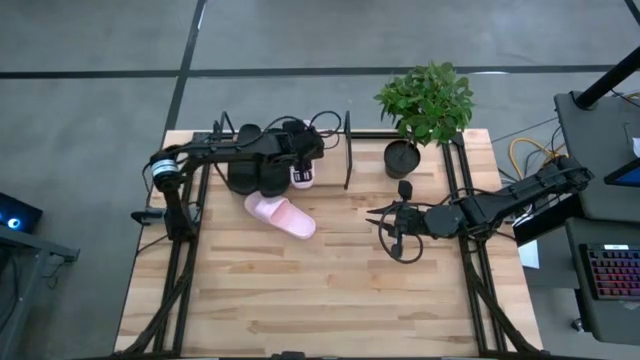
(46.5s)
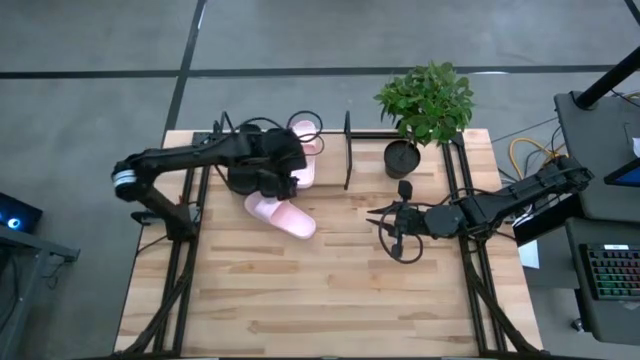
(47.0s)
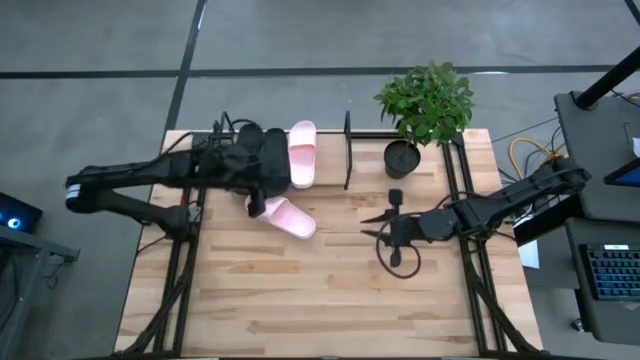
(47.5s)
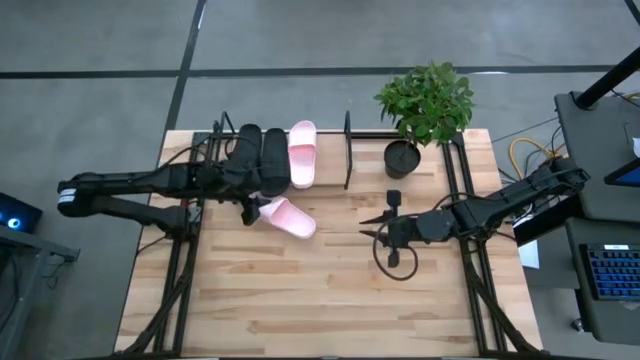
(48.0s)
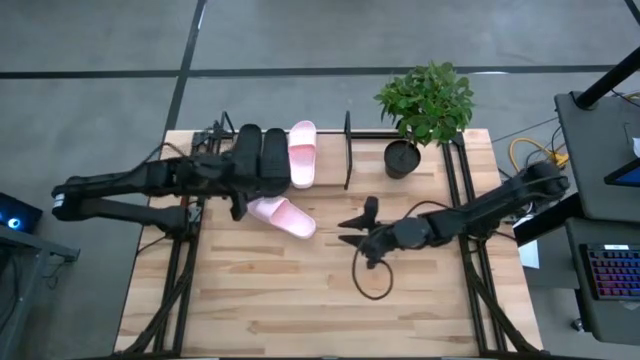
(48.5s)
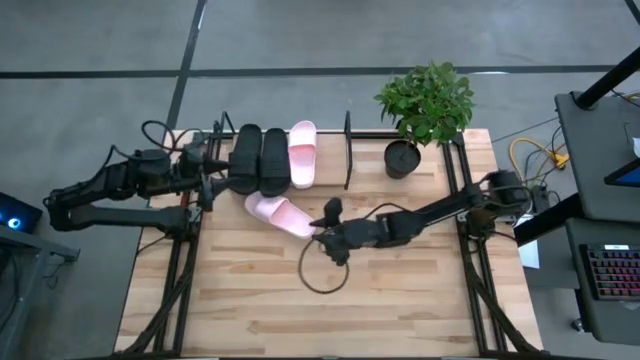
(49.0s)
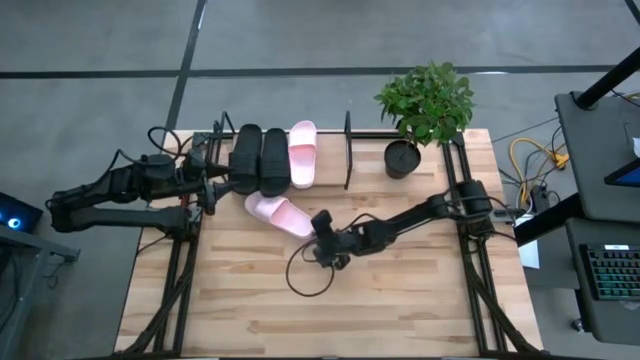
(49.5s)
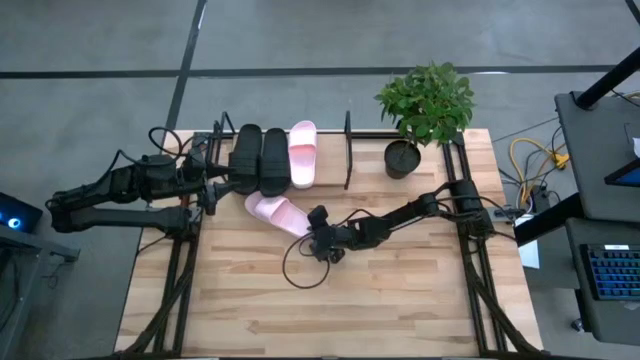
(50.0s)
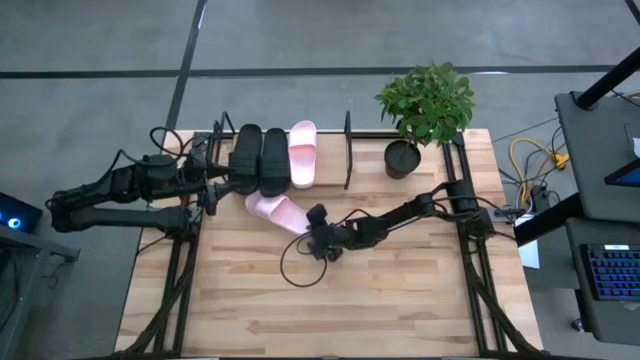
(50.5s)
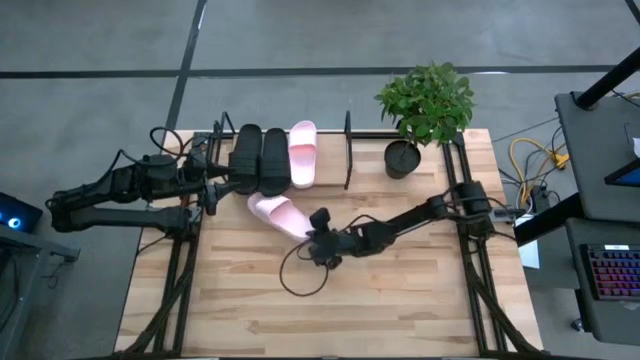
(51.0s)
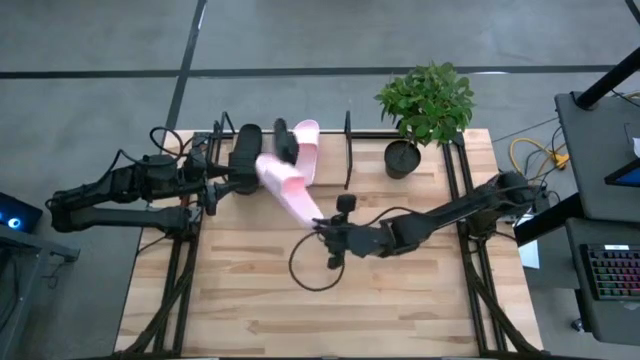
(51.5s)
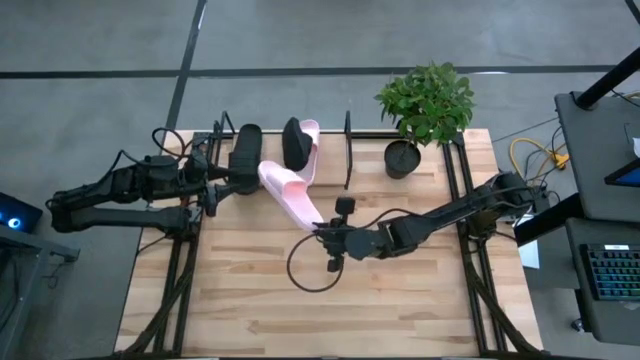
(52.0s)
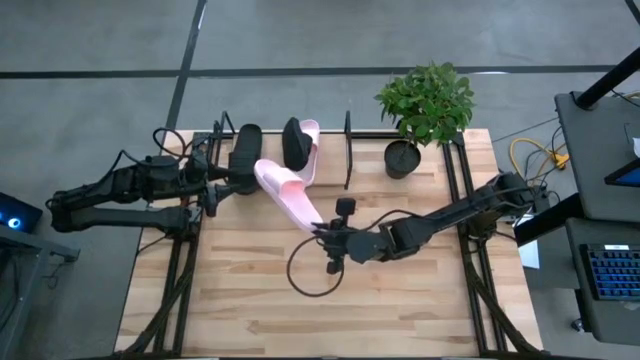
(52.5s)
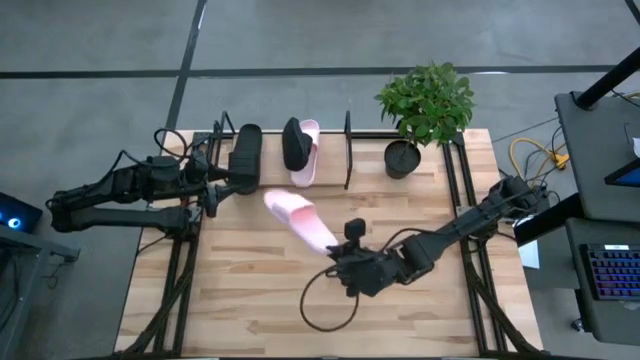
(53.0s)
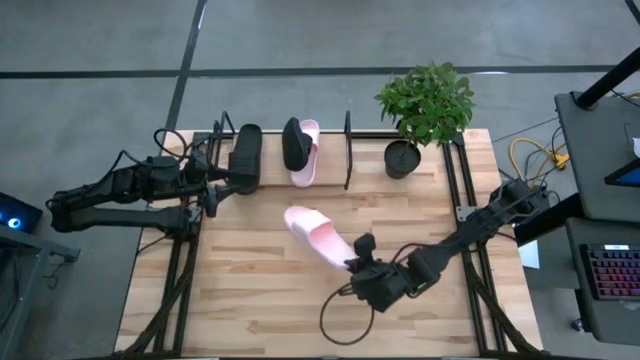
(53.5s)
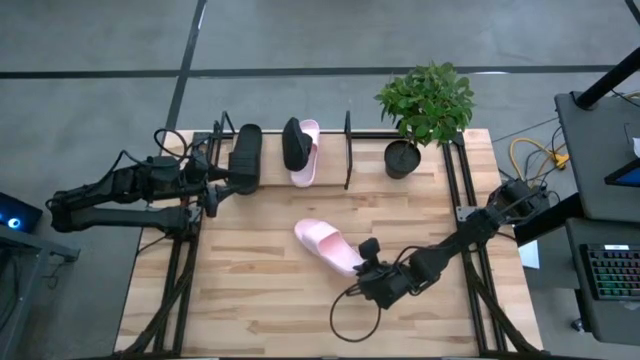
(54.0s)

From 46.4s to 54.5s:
Task: Pick and place slides into the shelf
Put the pink slipper on the shelf

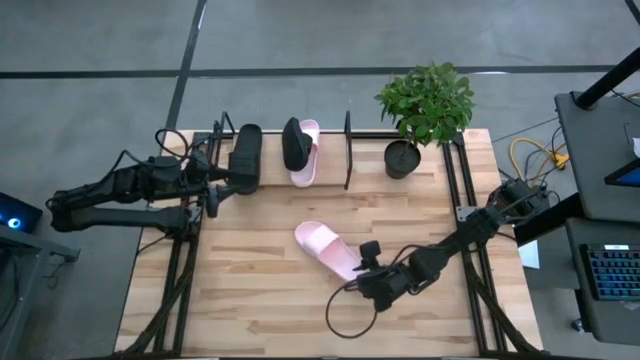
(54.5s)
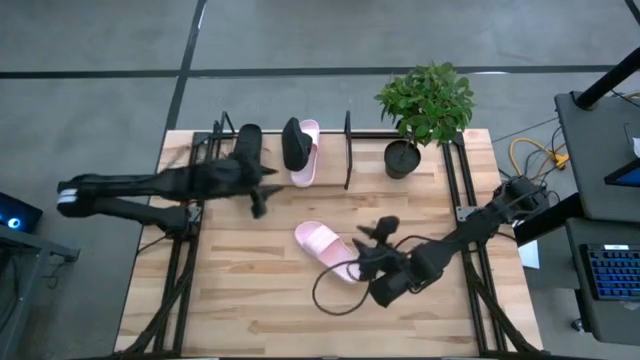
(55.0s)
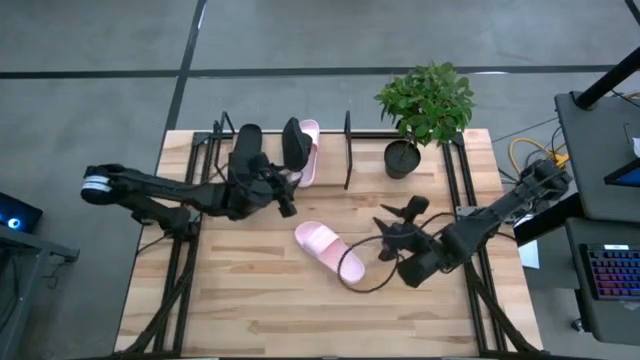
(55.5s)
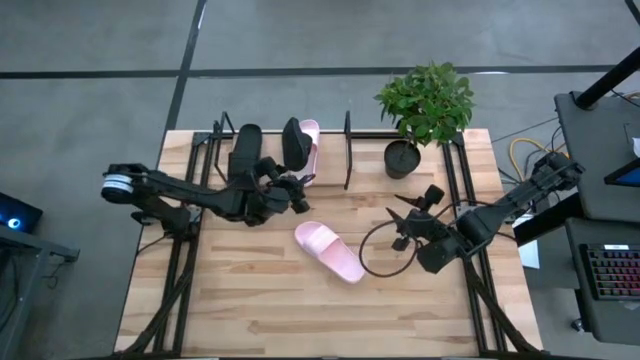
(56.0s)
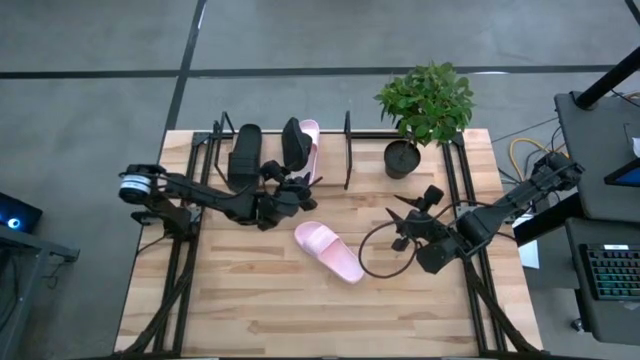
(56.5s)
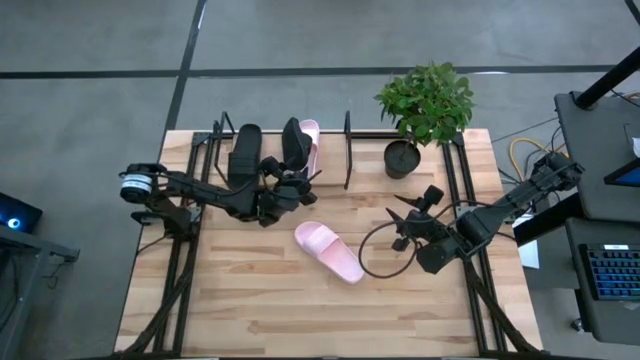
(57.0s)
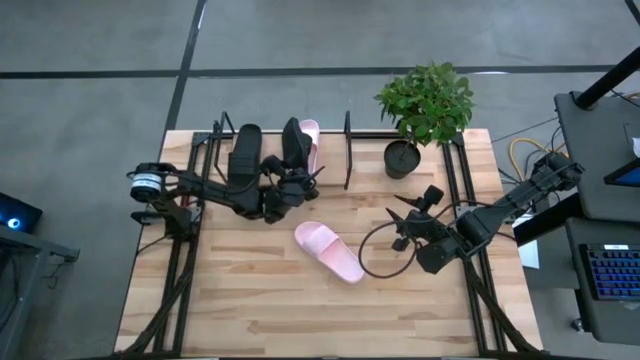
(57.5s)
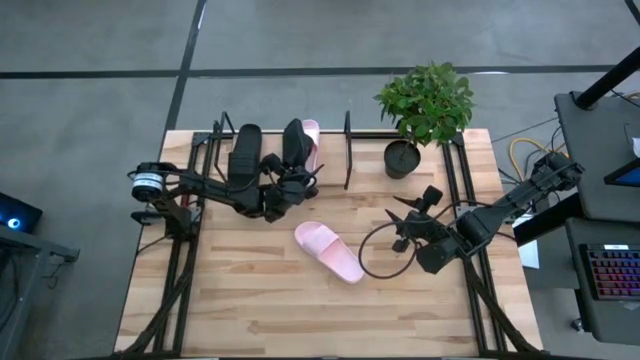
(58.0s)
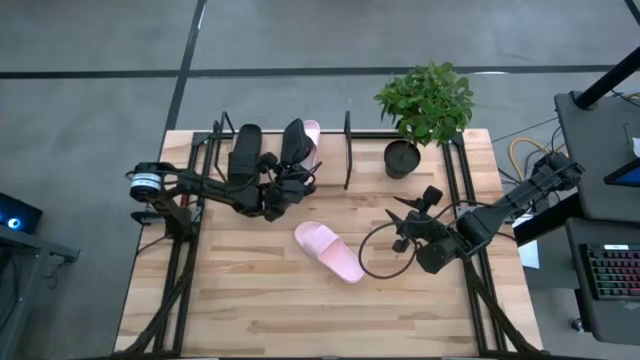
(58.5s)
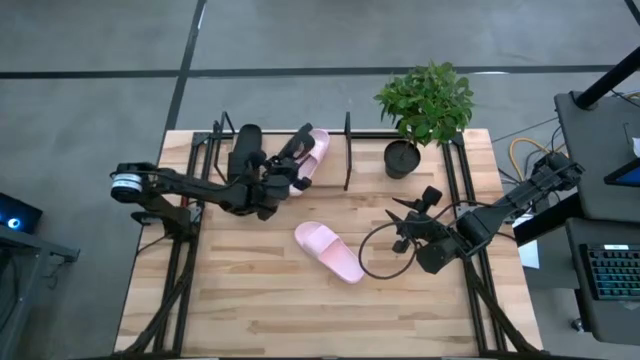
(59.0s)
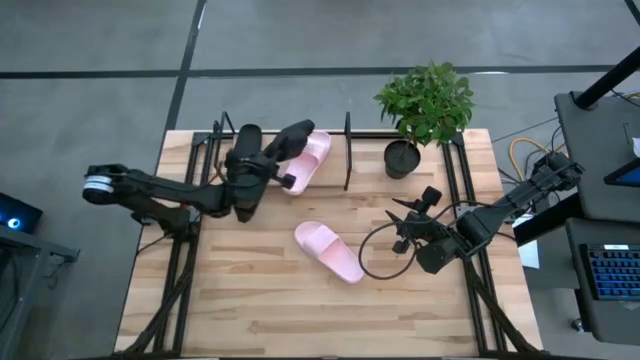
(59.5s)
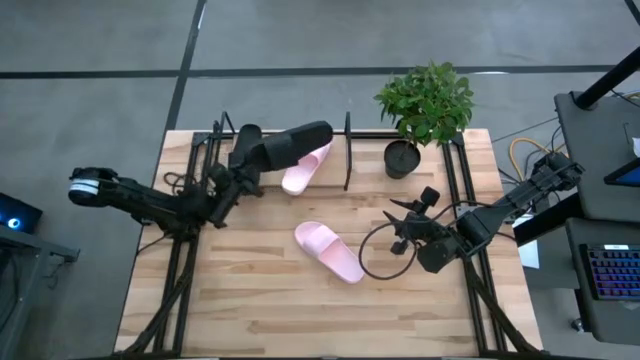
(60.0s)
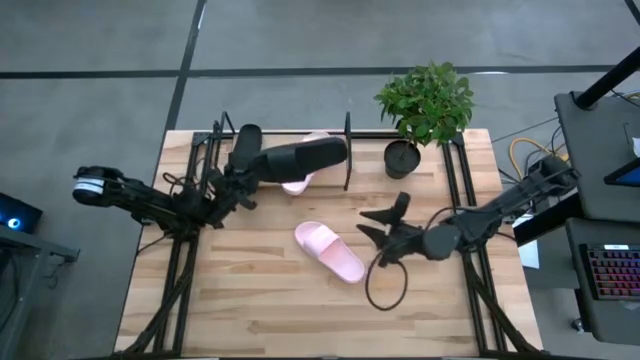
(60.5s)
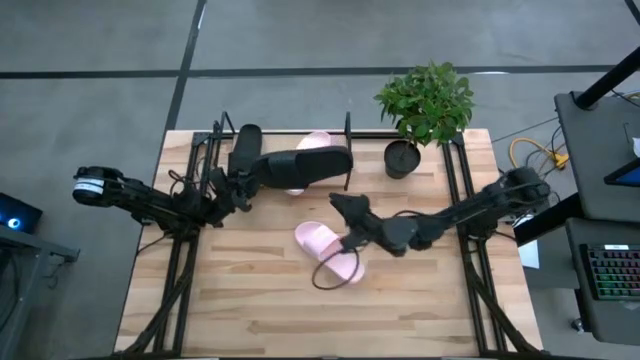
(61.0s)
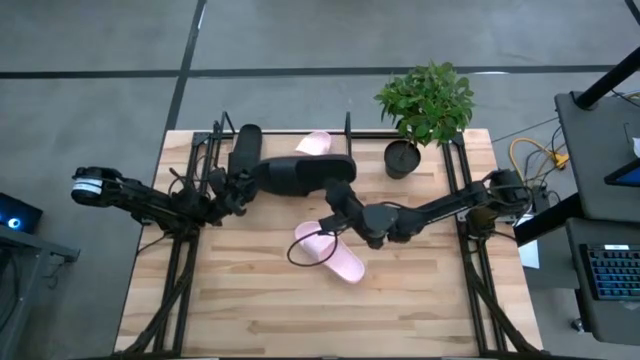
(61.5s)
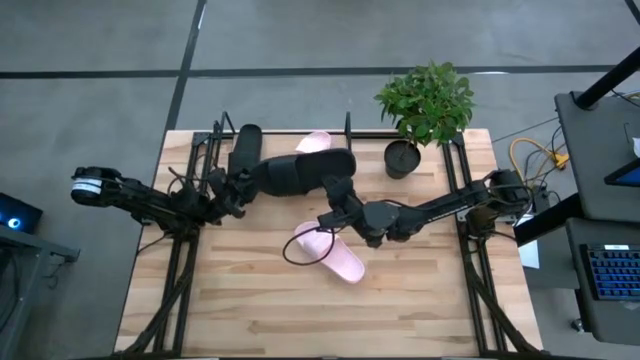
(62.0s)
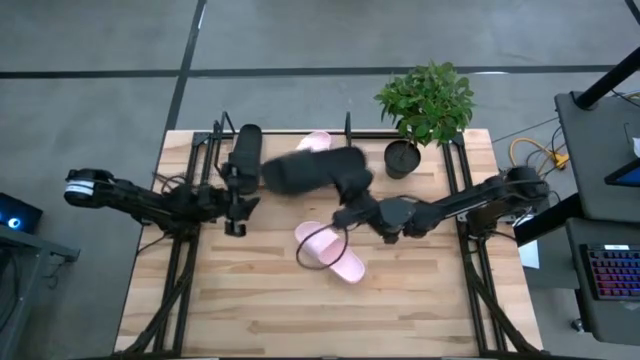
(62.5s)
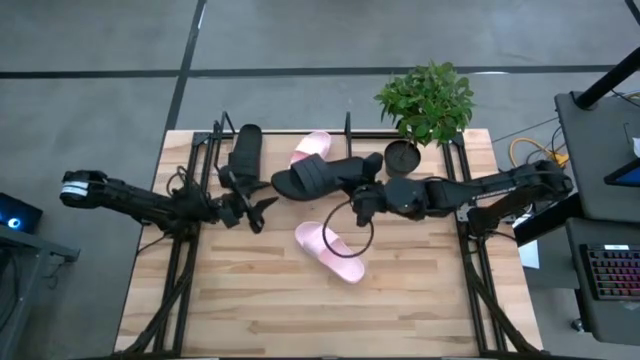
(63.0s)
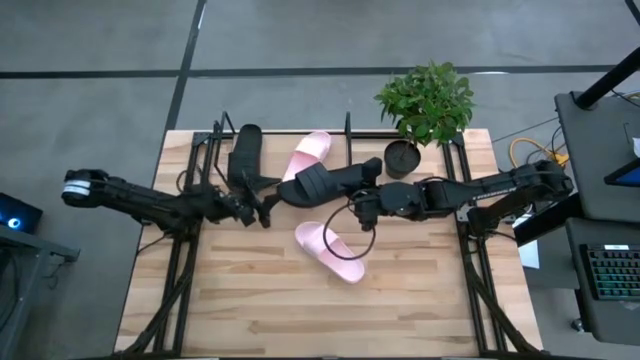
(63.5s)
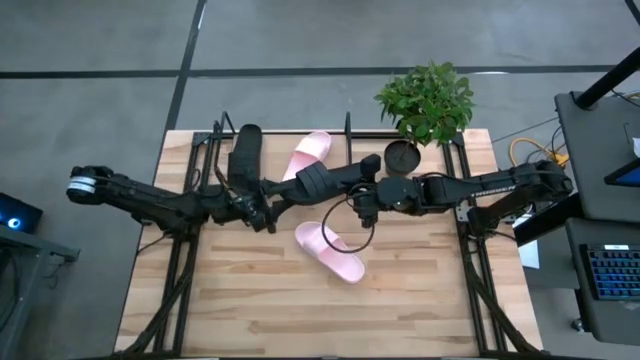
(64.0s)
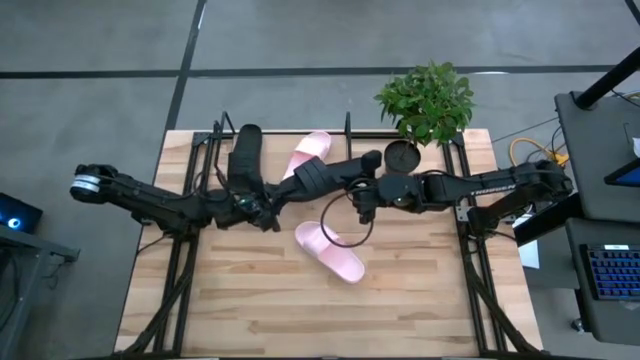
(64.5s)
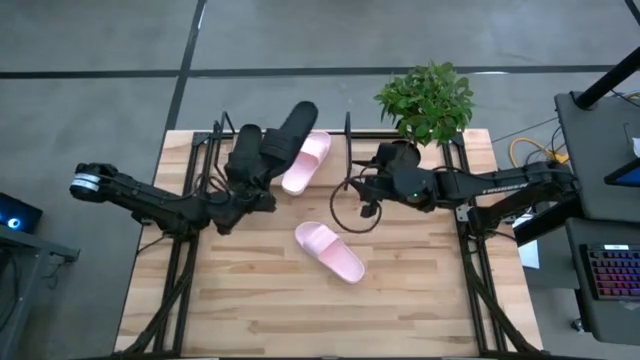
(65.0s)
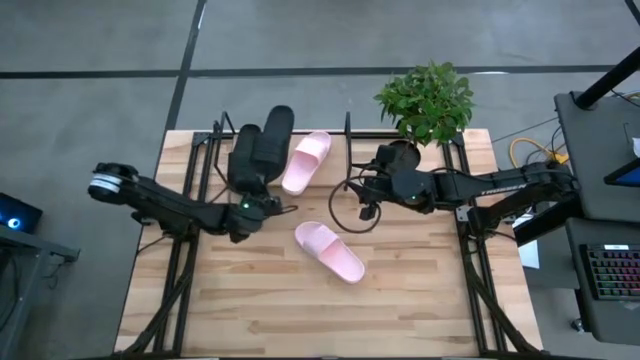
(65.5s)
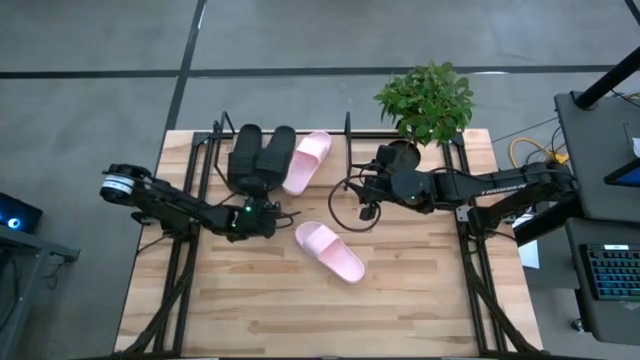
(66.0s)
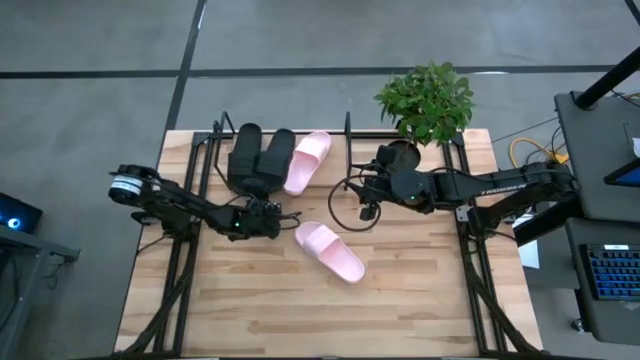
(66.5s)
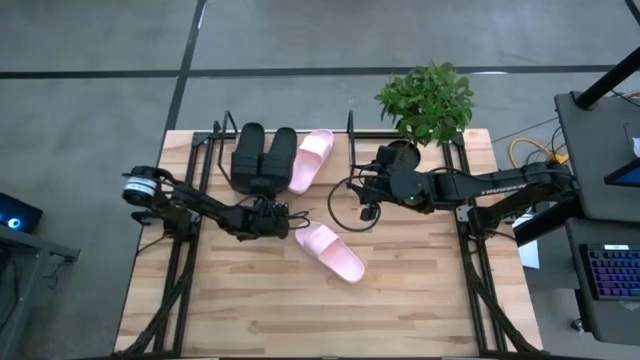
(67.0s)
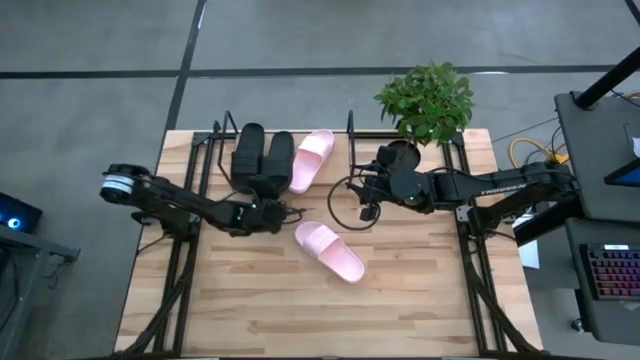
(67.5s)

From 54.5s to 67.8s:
Adjust the black slipper on the shelf

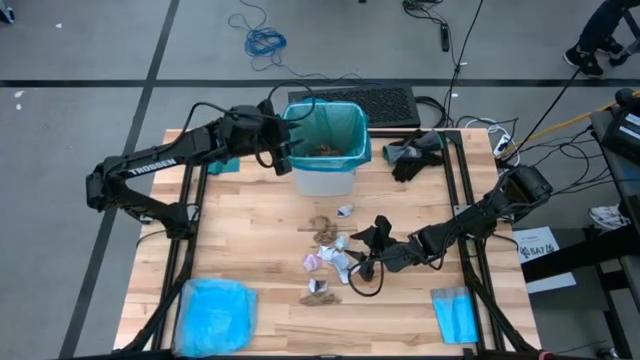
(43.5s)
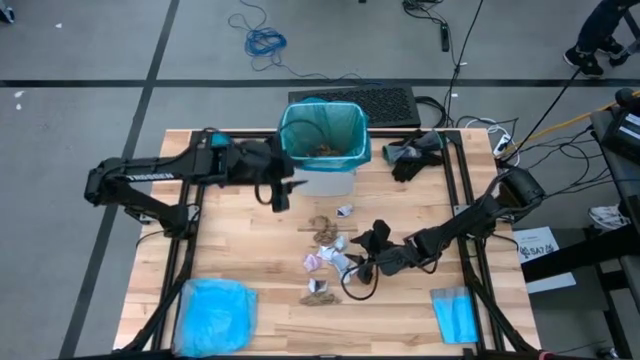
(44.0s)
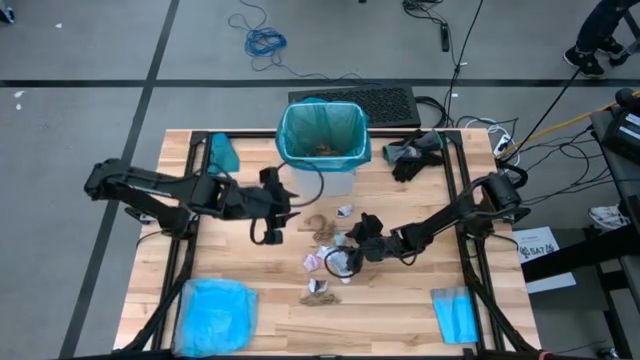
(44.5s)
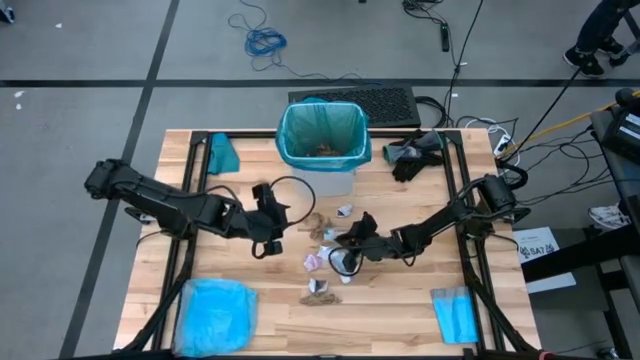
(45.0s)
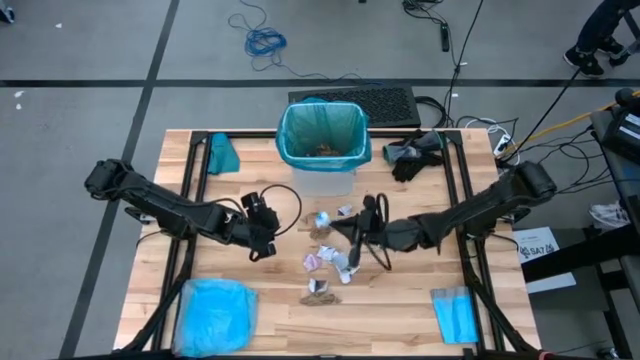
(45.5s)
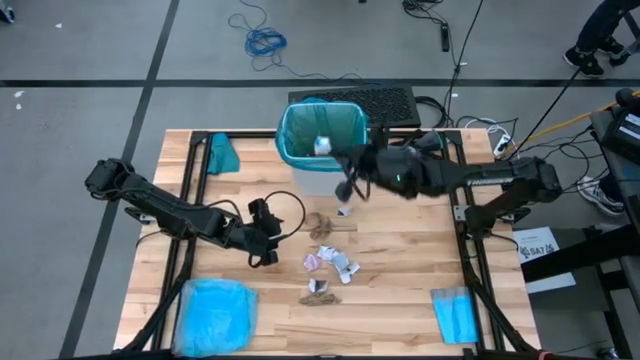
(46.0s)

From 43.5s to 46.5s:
Task: place trash/remove bag and relplace
Put the white trash bag into the trash bin
